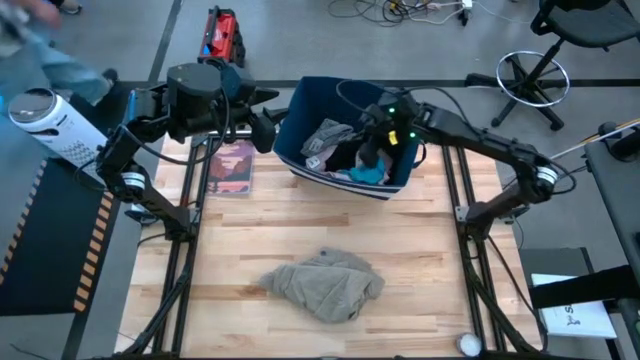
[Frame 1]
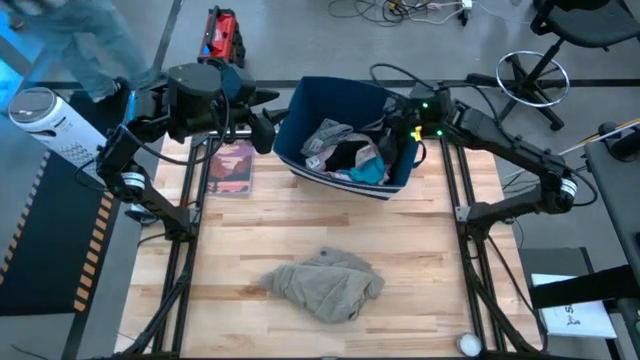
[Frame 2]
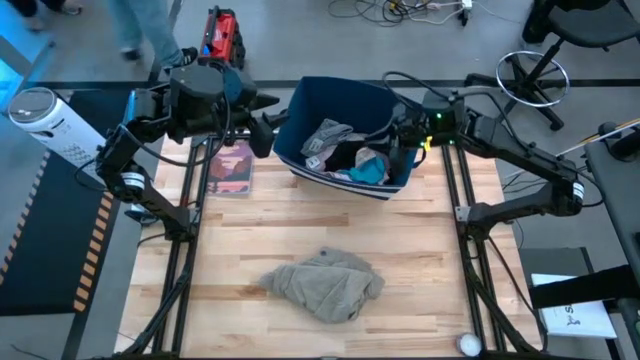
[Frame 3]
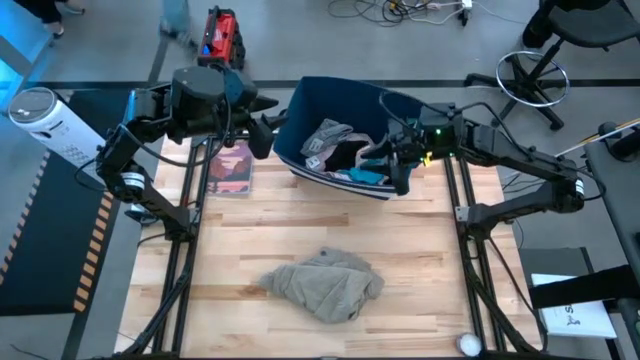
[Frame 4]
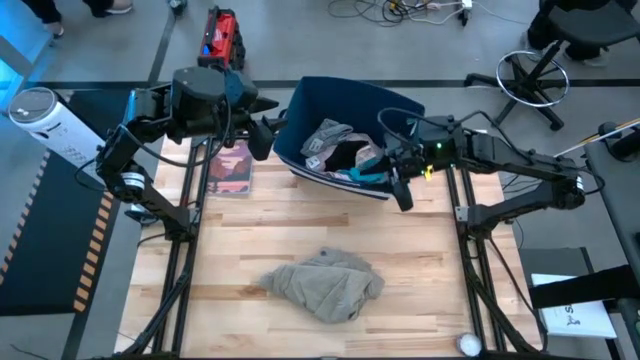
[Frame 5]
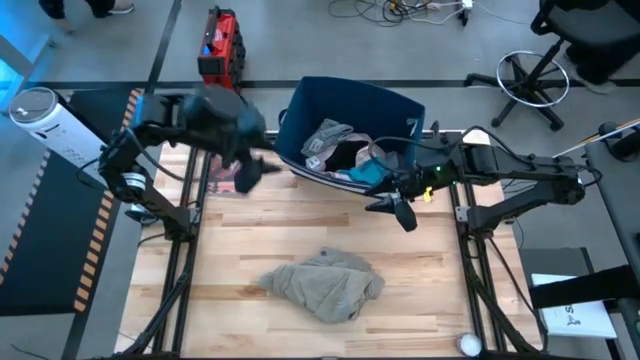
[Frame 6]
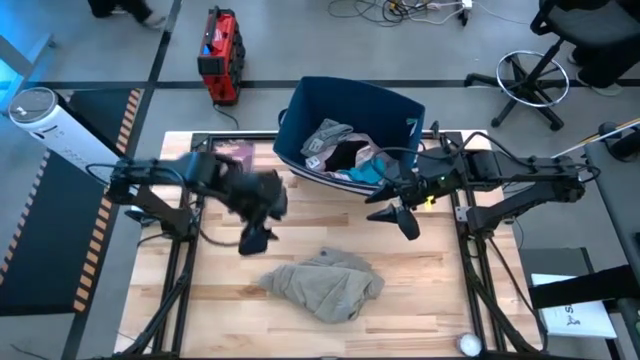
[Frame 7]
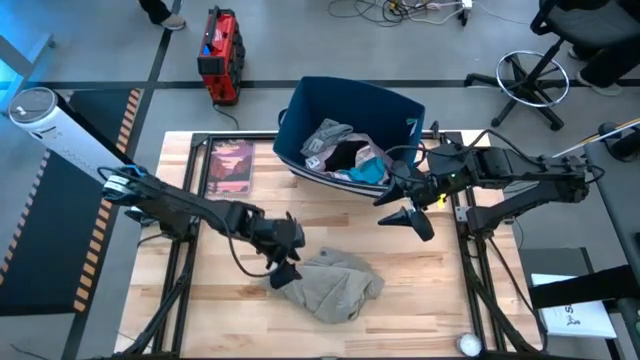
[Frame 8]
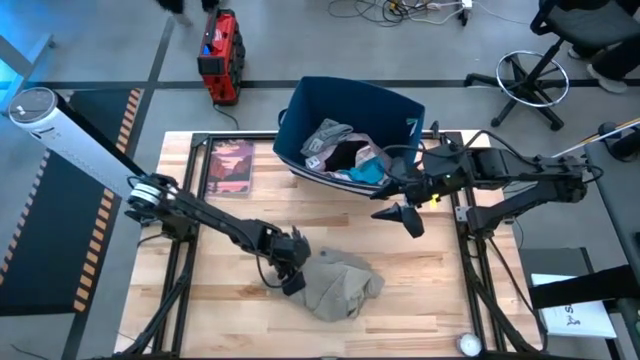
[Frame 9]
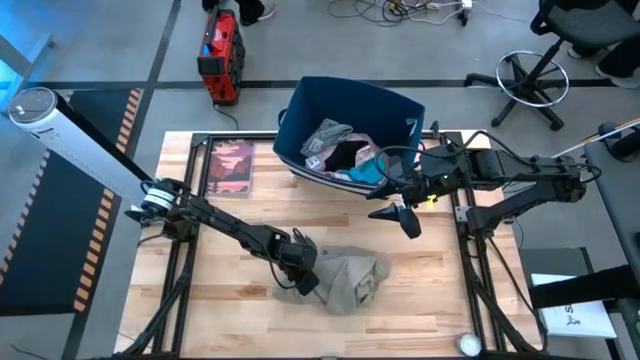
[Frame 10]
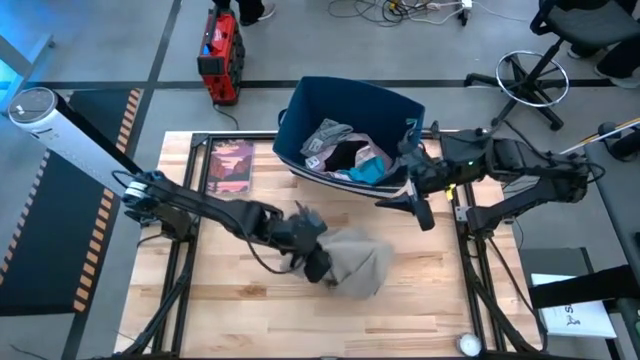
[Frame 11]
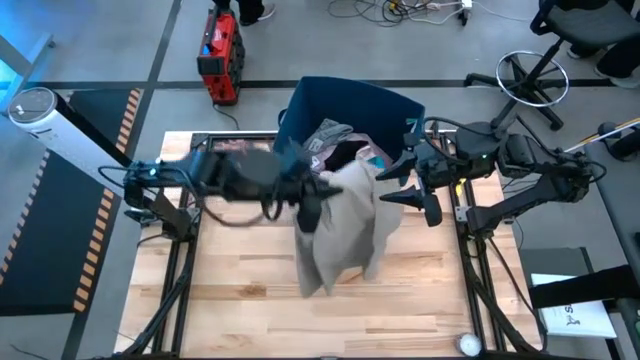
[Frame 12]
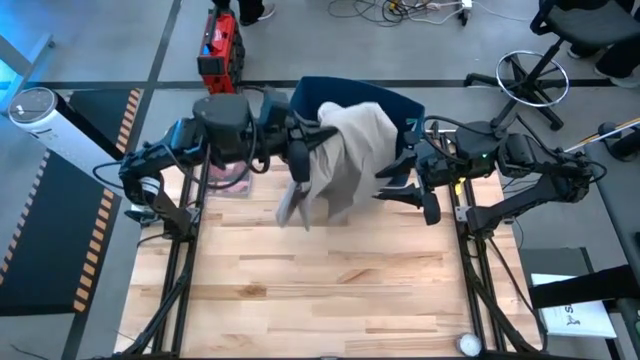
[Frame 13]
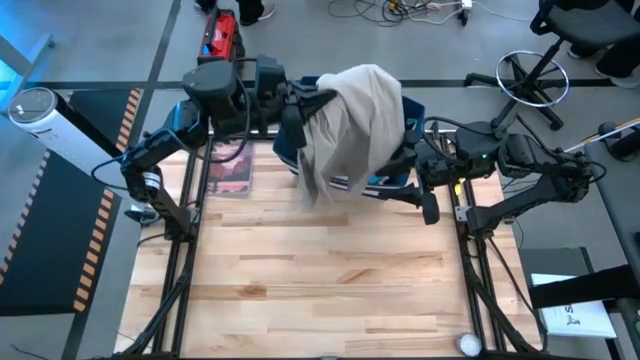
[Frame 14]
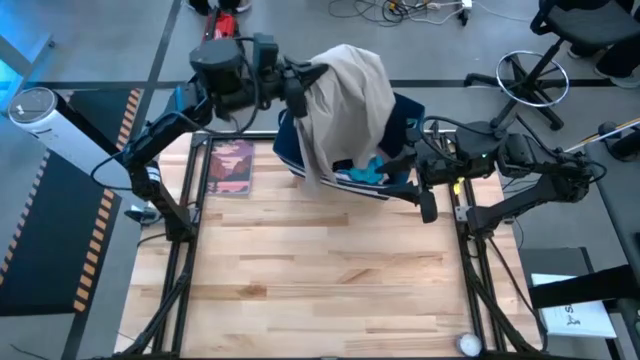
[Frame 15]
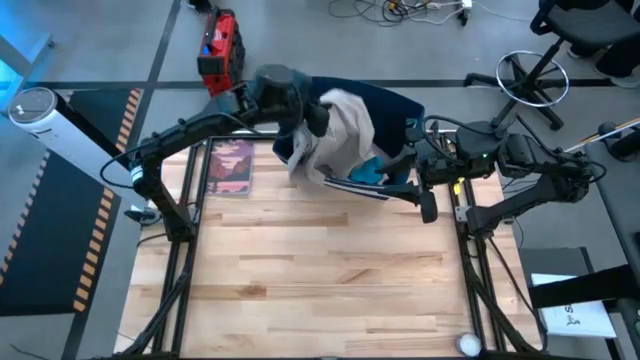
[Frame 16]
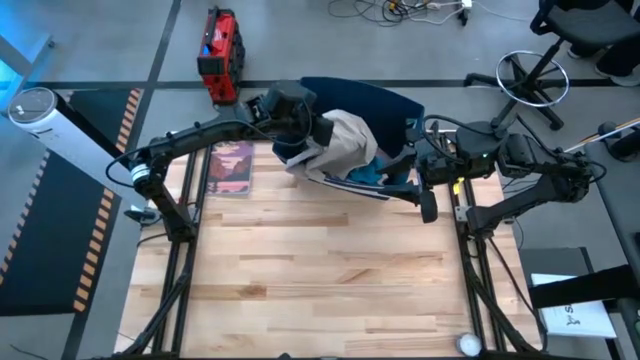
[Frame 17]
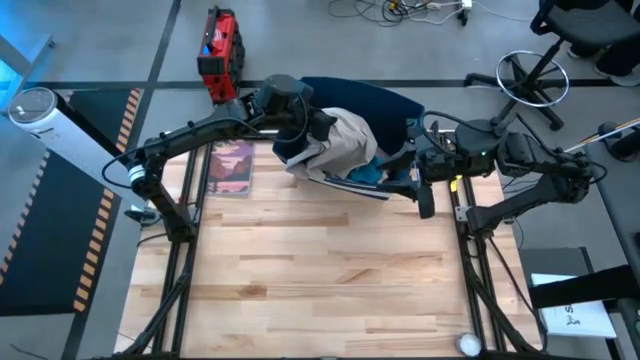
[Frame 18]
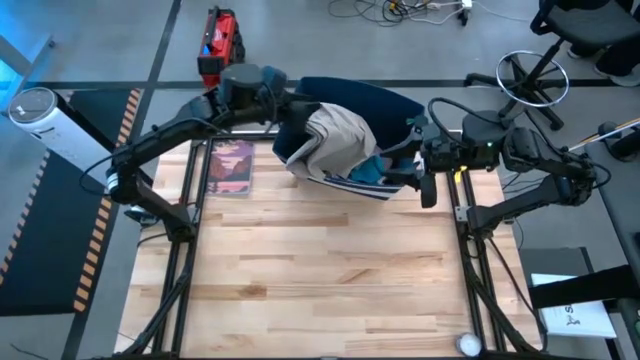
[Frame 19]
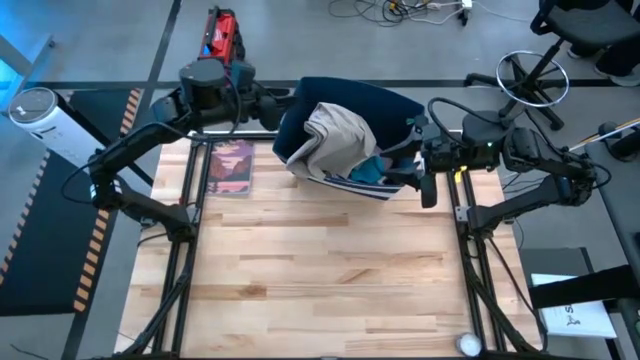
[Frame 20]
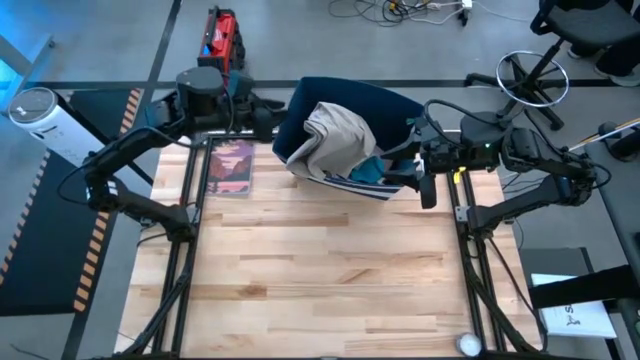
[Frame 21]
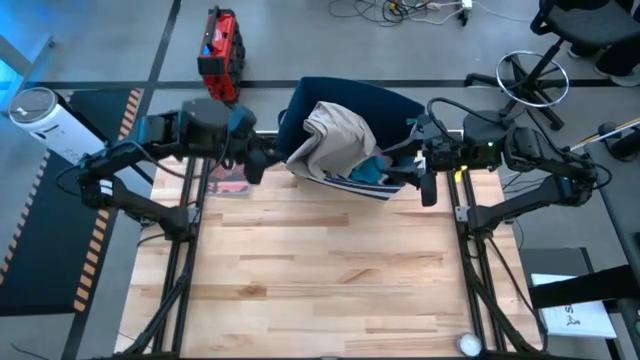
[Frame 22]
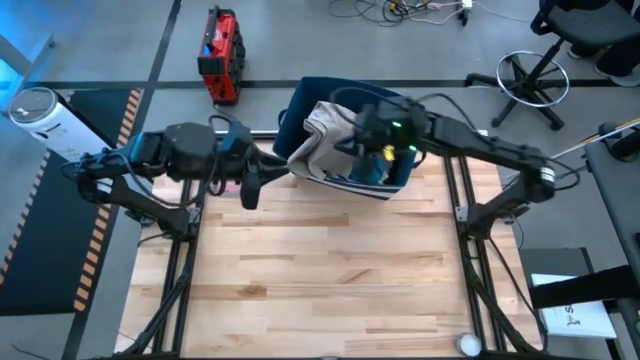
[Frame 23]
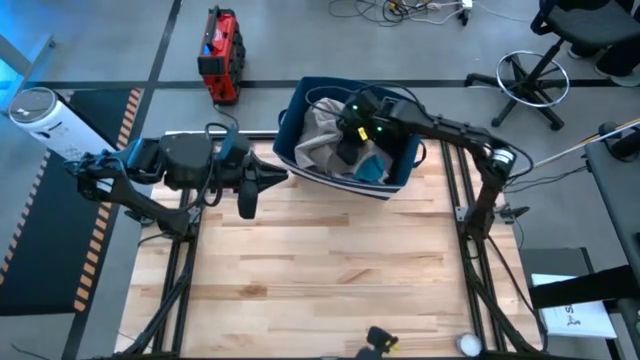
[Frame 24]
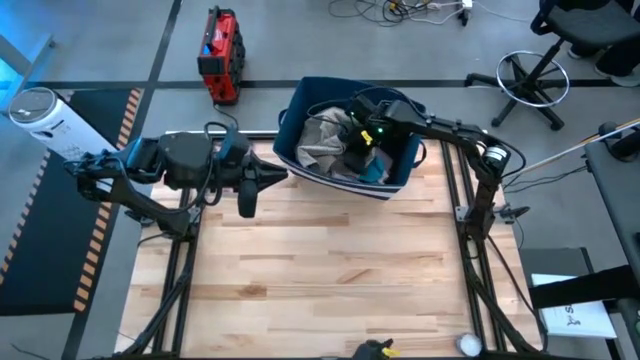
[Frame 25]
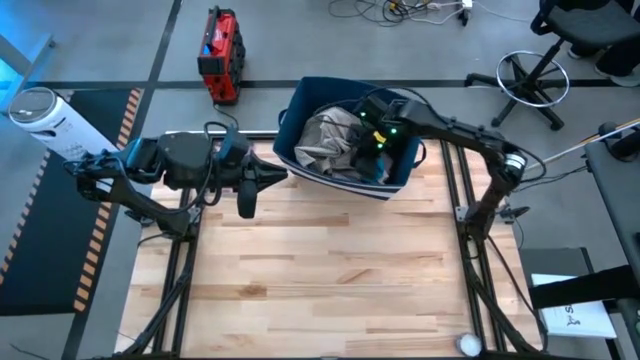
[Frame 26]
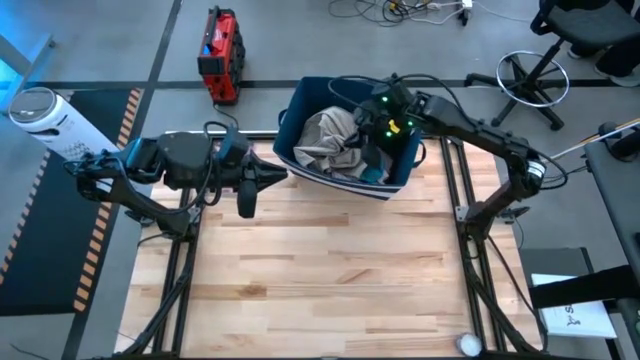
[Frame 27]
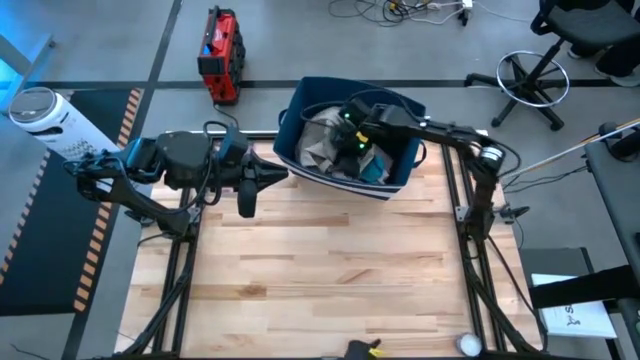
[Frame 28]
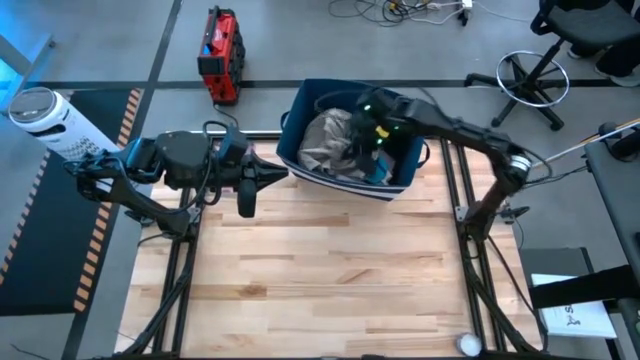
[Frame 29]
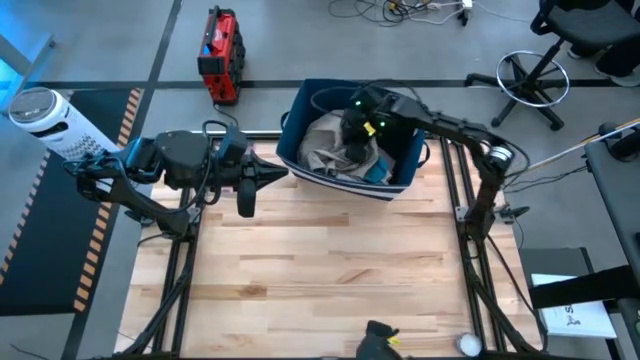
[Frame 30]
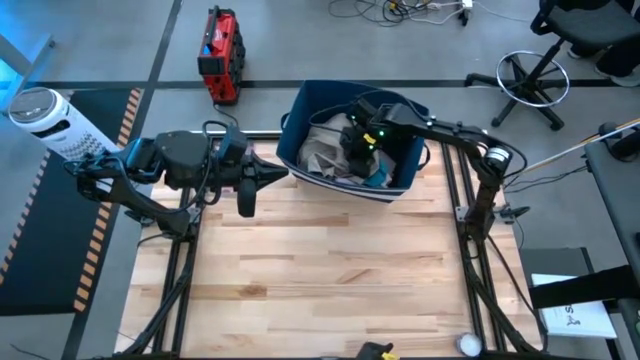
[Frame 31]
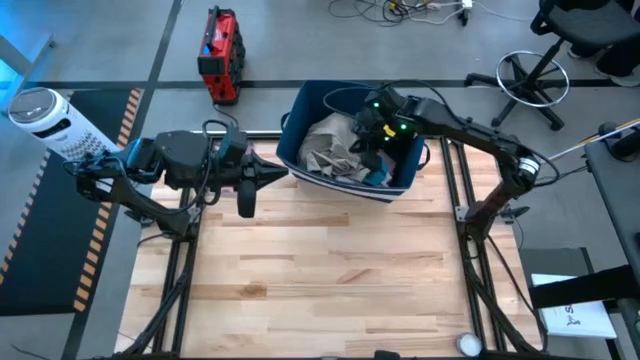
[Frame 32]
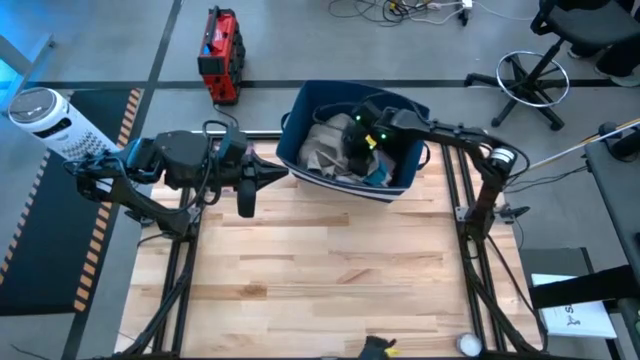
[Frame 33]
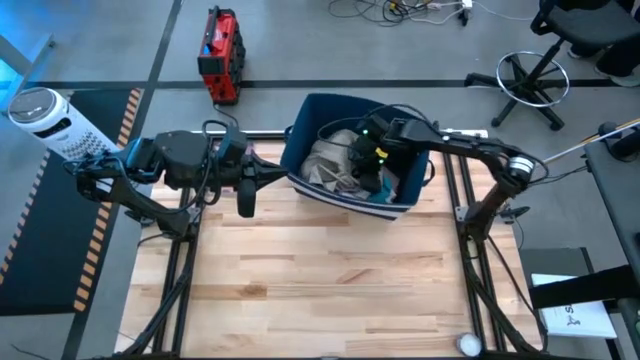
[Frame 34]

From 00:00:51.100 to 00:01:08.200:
Task: Sort clothes
Put the gray pants into the blue laundry bin

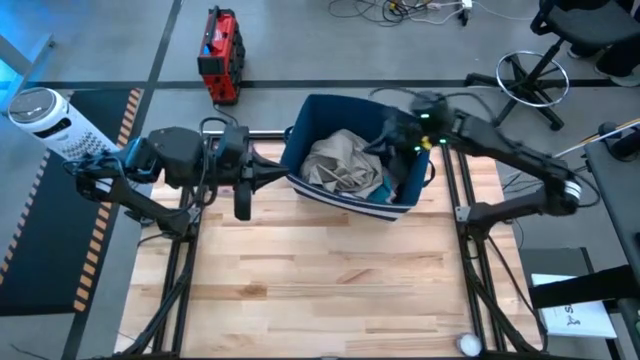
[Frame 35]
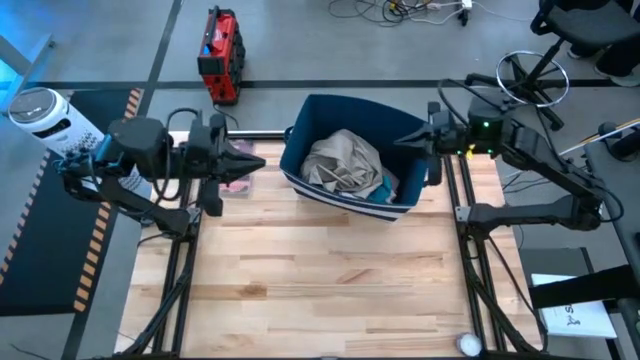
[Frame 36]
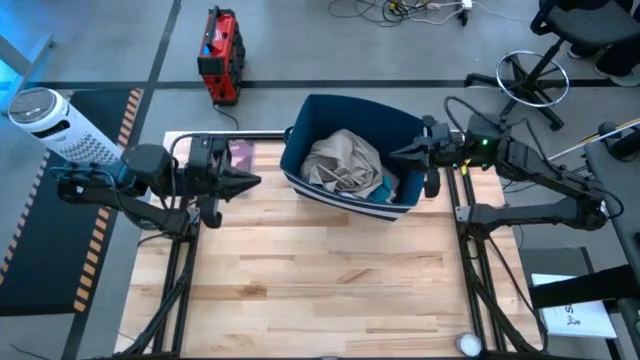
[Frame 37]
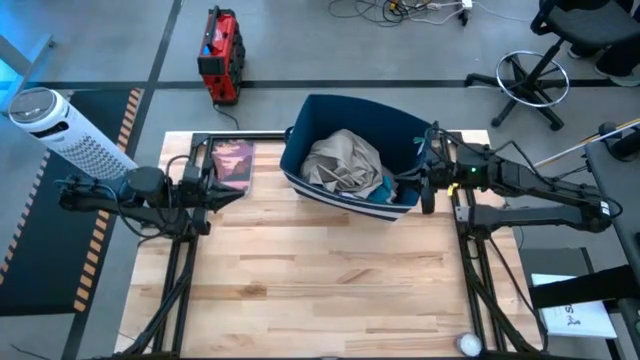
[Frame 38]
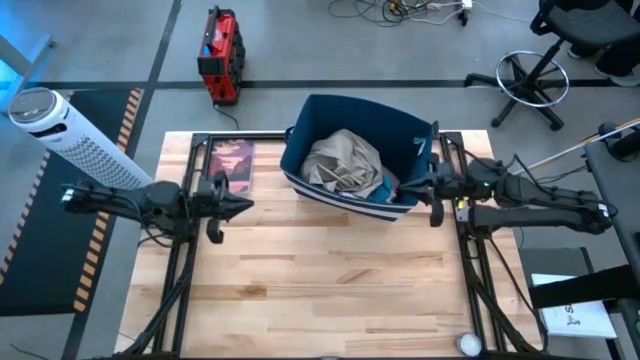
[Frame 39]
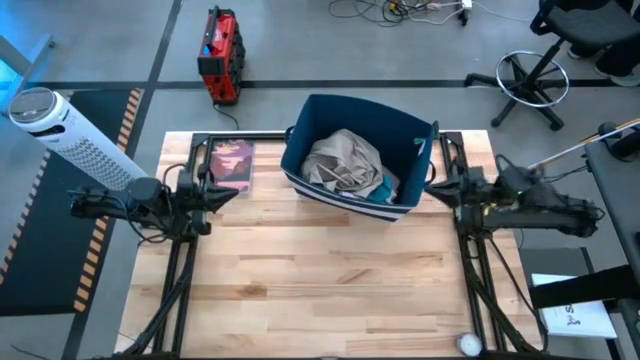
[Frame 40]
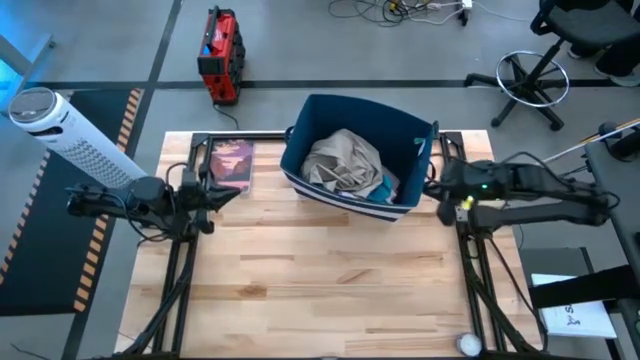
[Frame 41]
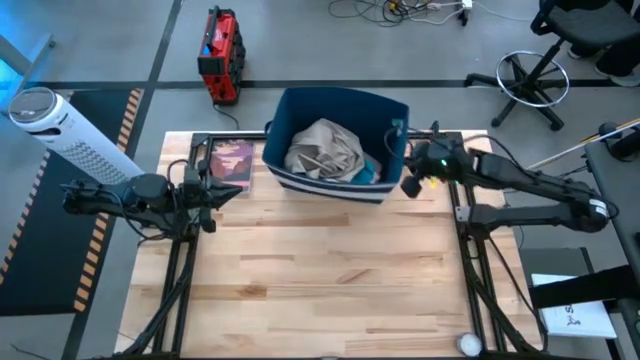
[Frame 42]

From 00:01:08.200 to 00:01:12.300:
Adjust the blue laundry bin
